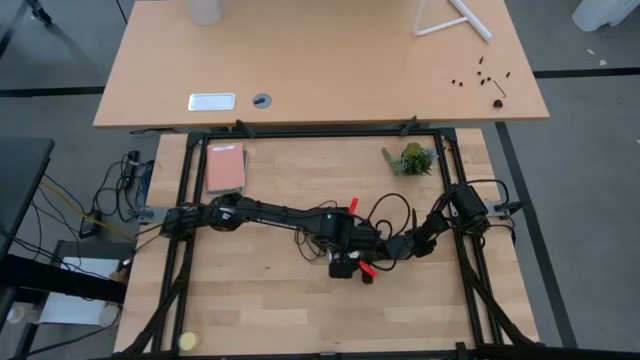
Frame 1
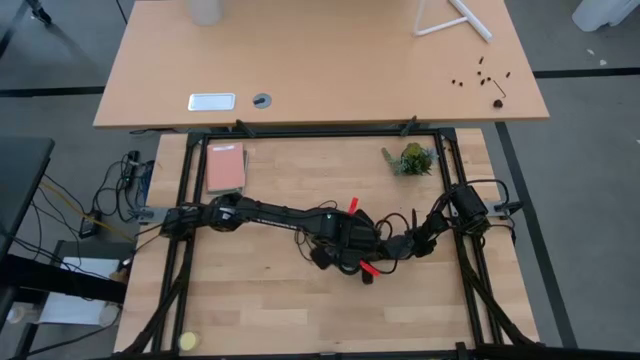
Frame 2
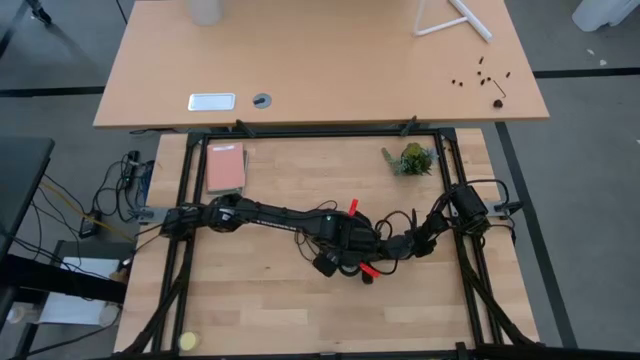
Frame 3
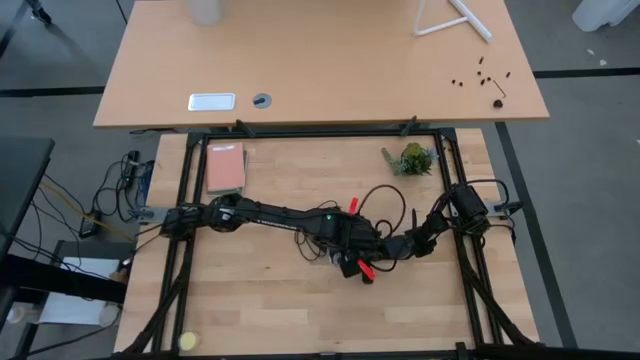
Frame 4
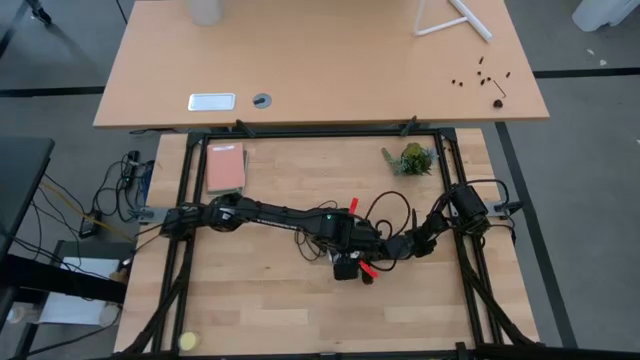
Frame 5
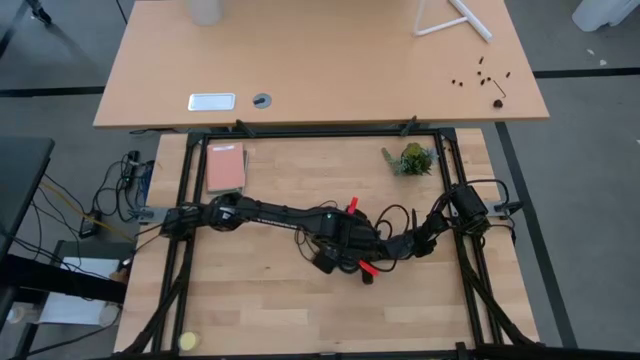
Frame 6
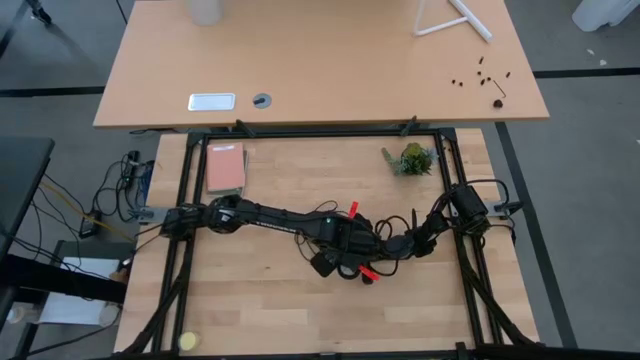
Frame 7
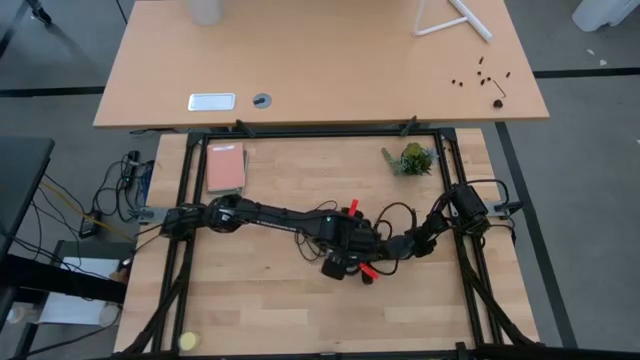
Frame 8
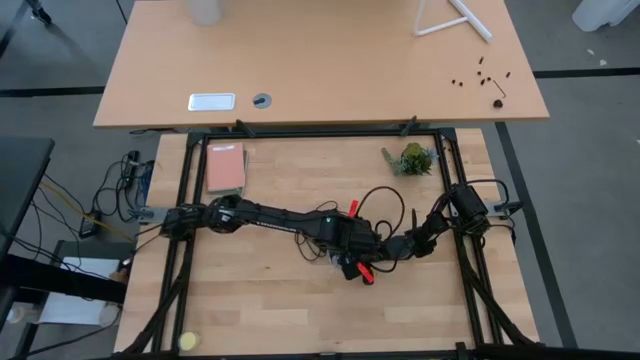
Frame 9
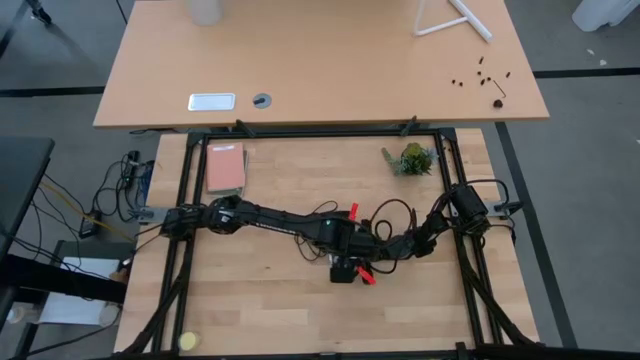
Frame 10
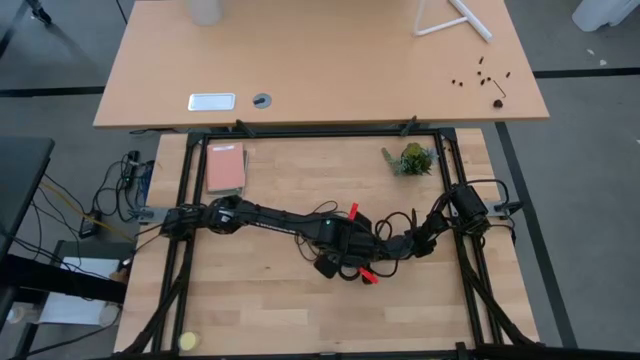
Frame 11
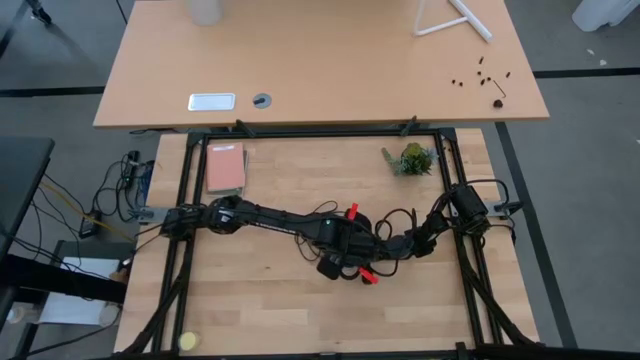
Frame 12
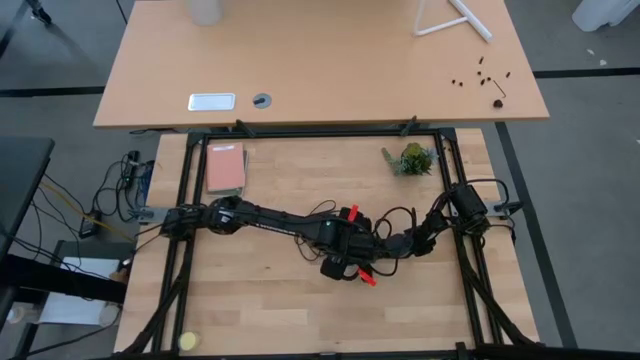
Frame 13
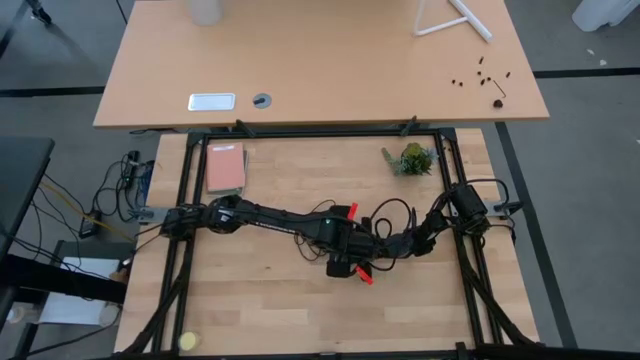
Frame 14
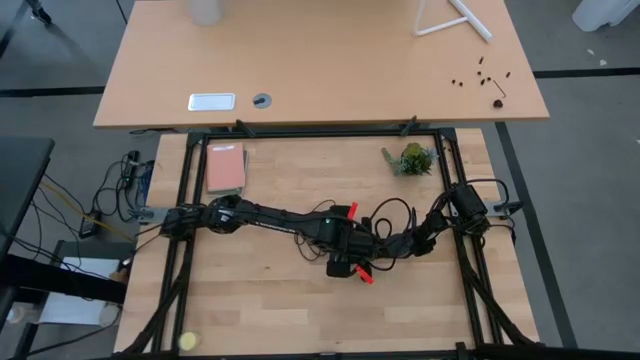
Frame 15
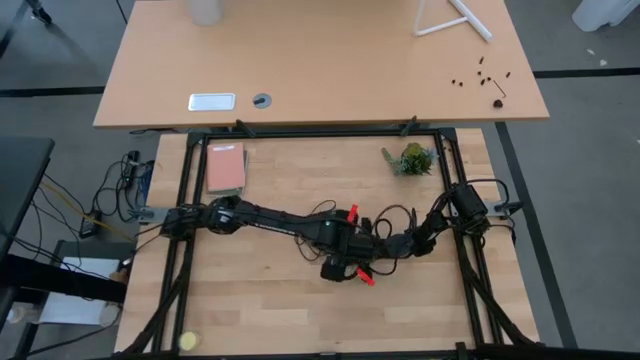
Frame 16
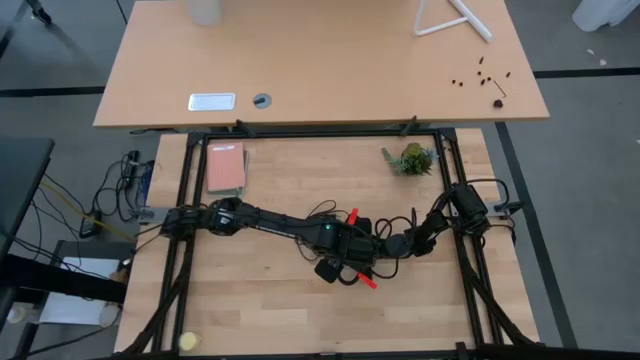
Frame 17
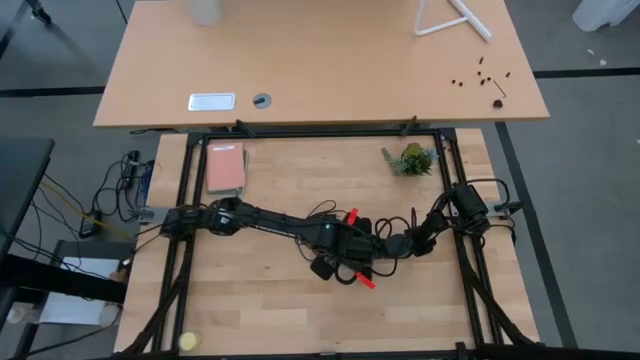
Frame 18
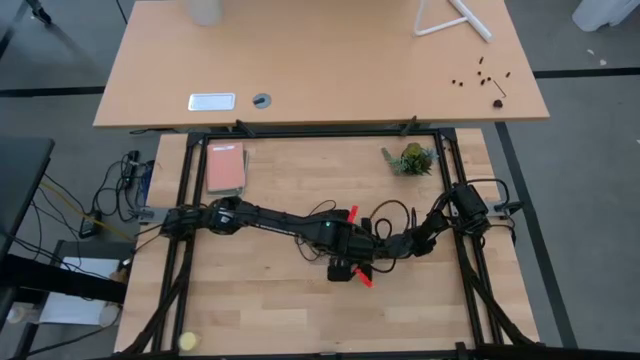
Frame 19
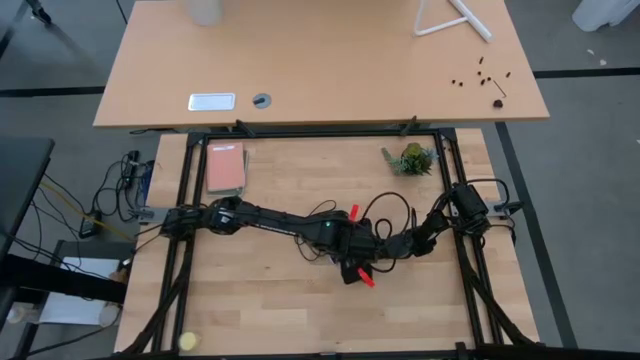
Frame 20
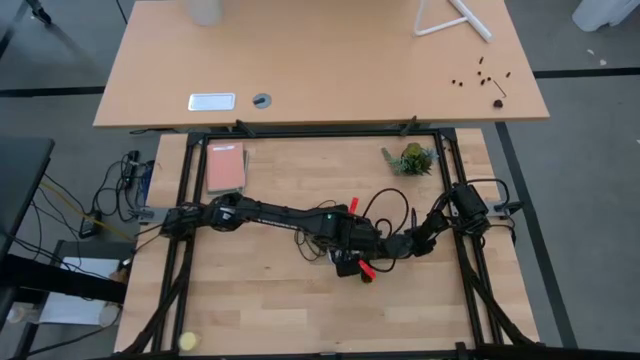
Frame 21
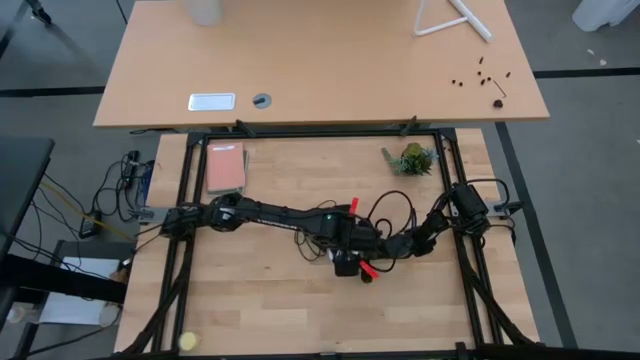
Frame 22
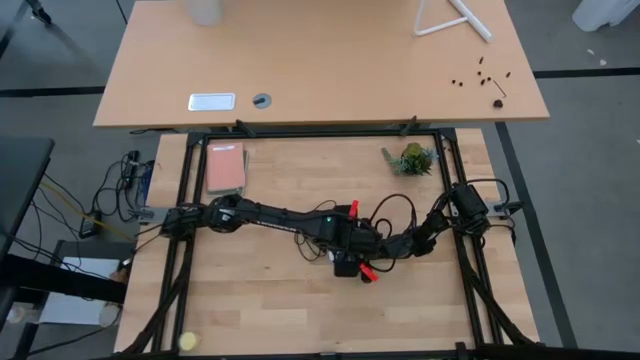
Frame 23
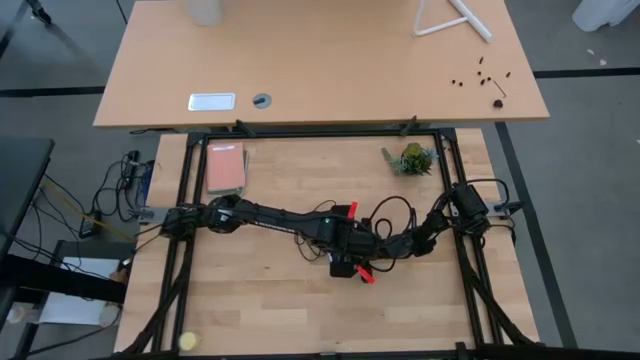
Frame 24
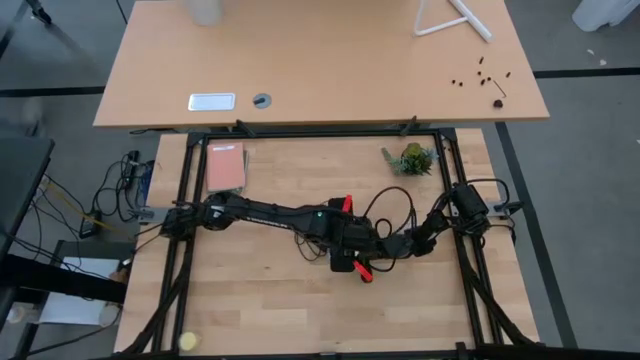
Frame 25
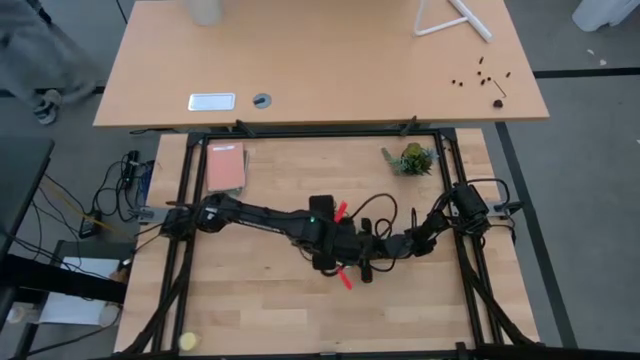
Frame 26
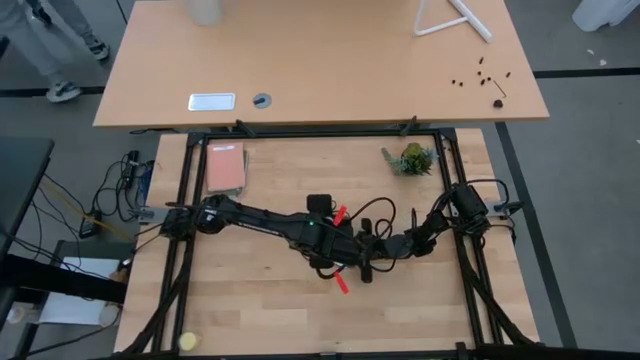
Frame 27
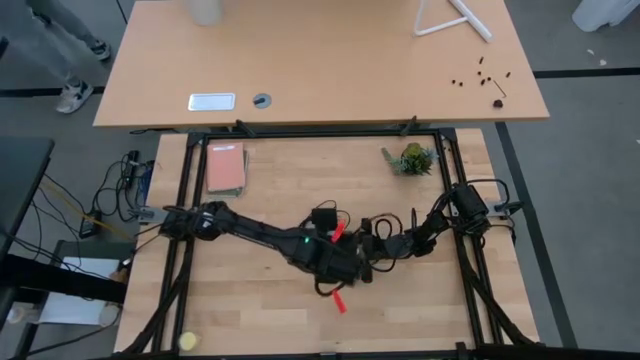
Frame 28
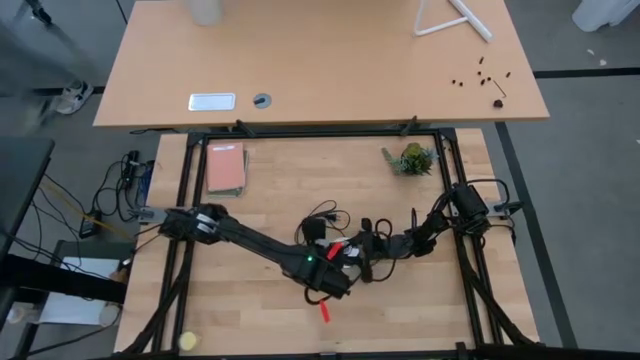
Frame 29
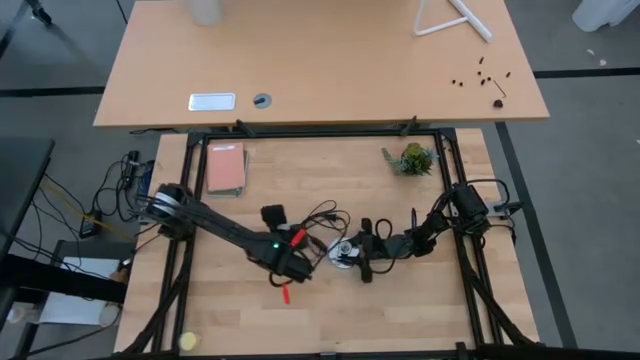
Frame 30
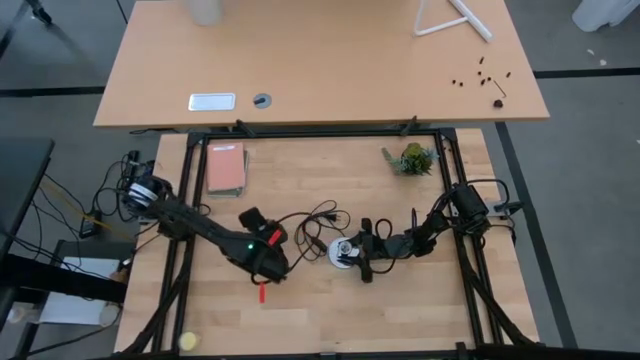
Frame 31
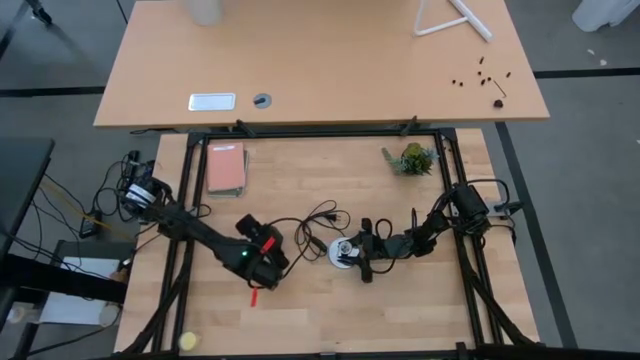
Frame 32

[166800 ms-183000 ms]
Task: Screw lightbulb
Remove the lightbulb from the lamp

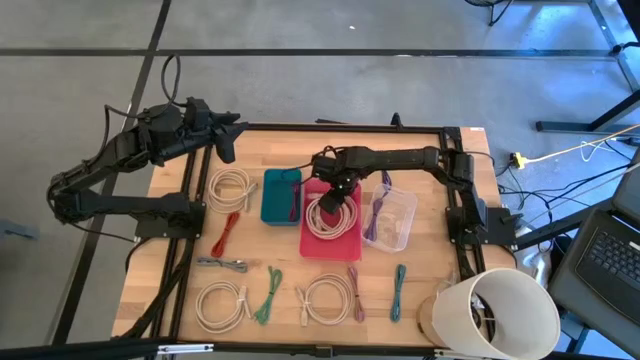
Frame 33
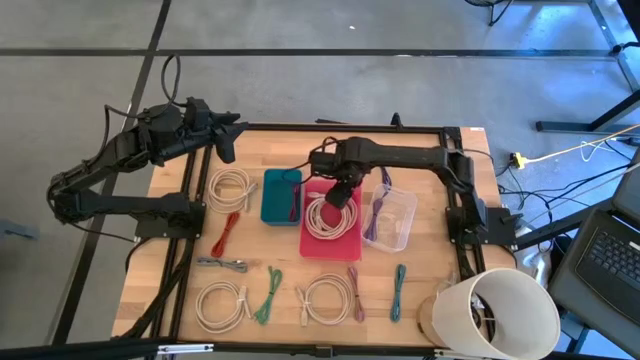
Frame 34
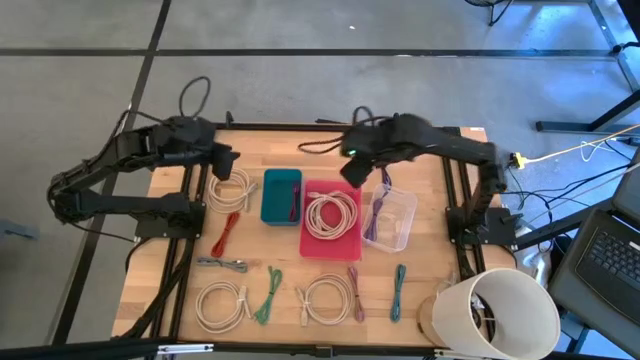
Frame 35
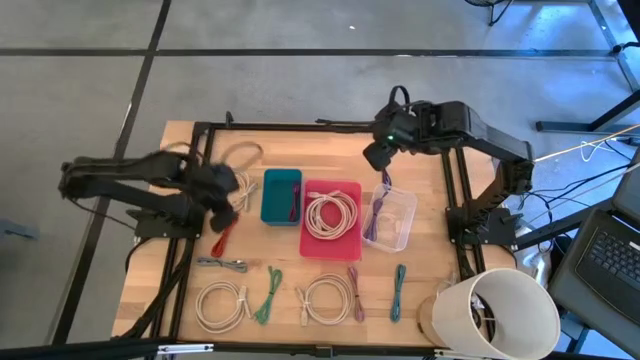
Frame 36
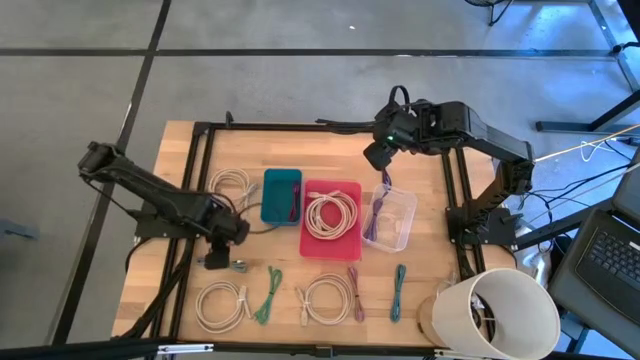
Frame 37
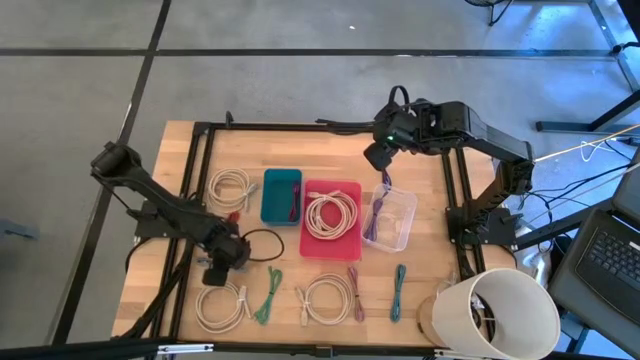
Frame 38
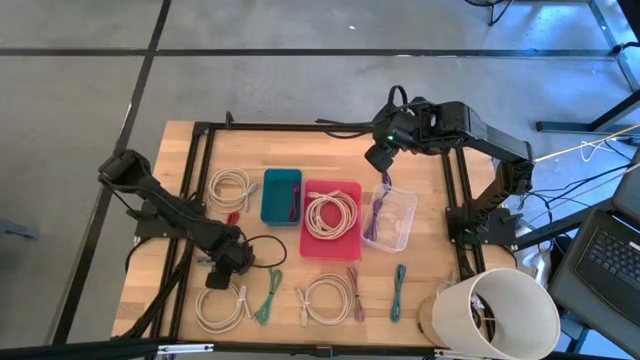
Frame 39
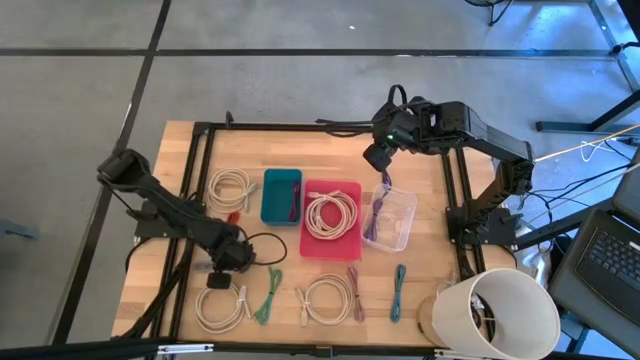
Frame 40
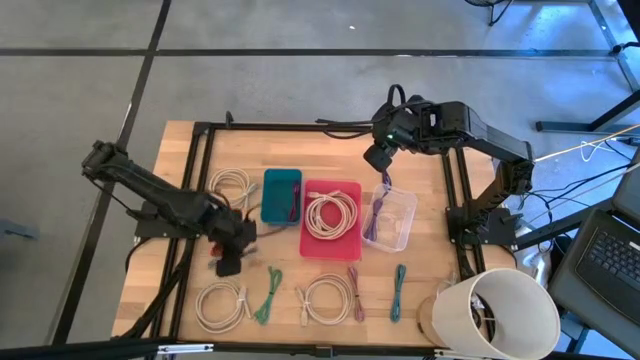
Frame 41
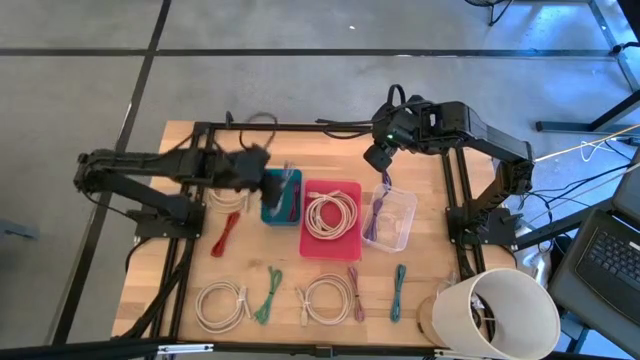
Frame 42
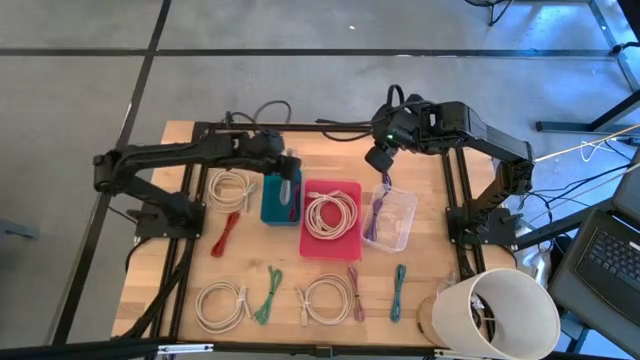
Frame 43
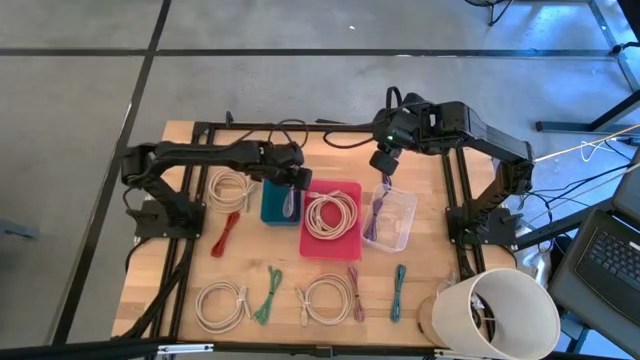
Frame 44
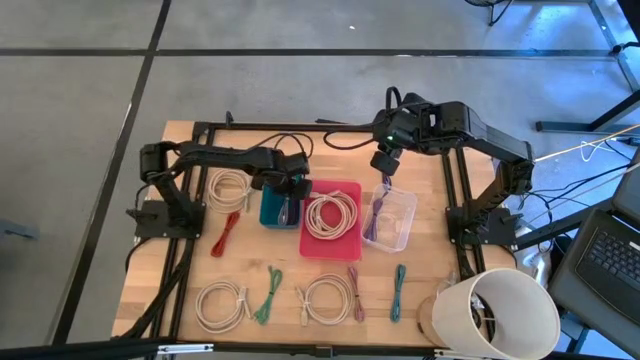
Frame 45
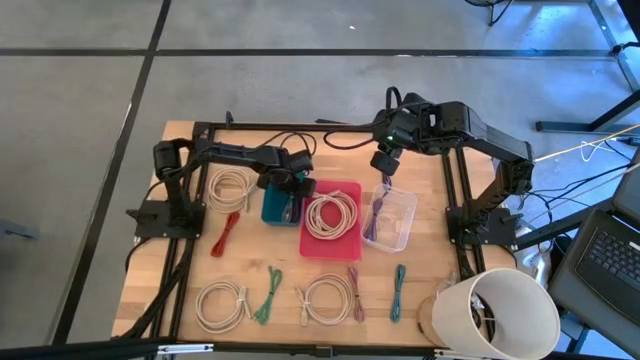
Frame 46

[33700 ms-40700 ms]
Task: Pick & Place USB Port
Put the white and black charger cable into the blue bin
